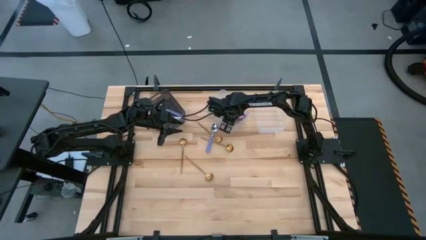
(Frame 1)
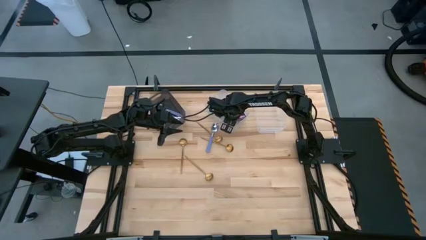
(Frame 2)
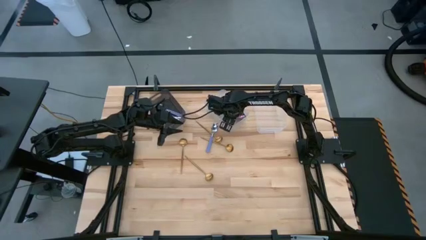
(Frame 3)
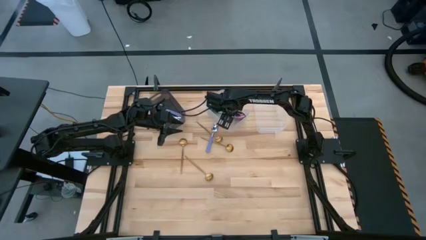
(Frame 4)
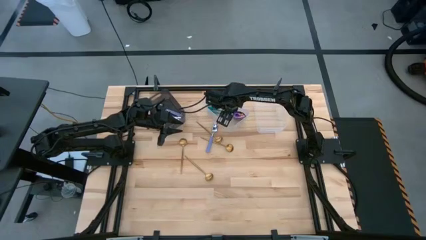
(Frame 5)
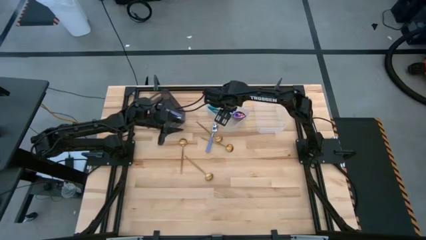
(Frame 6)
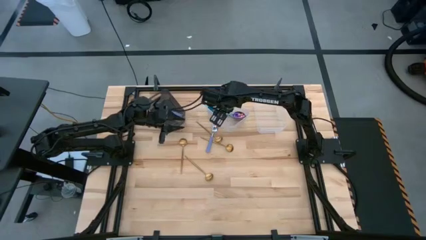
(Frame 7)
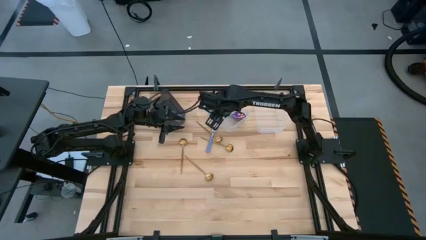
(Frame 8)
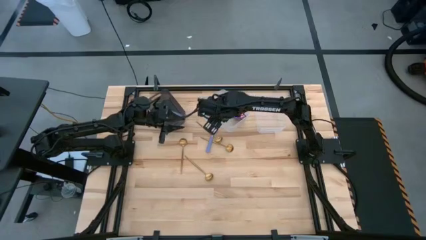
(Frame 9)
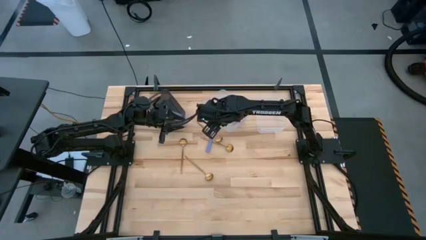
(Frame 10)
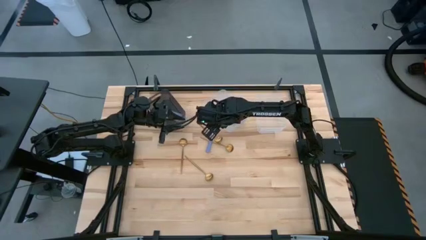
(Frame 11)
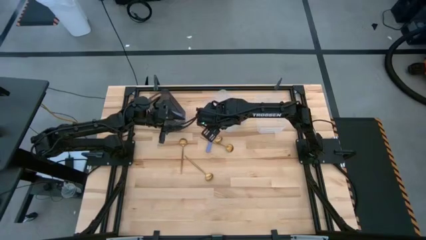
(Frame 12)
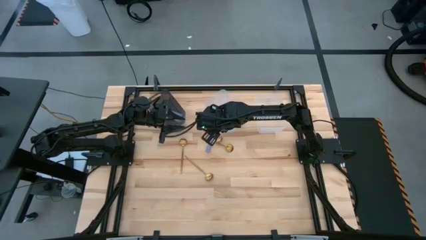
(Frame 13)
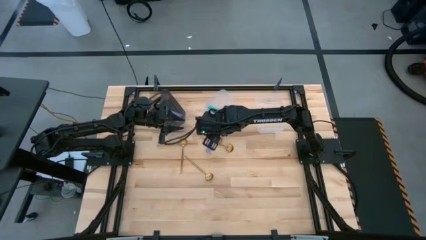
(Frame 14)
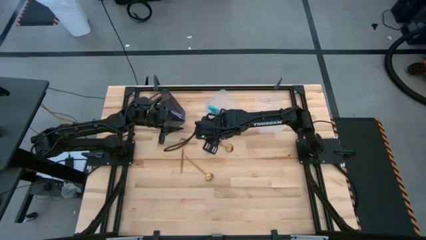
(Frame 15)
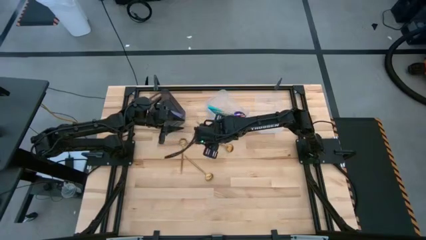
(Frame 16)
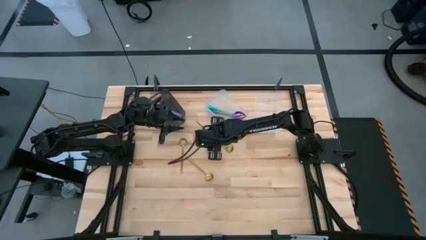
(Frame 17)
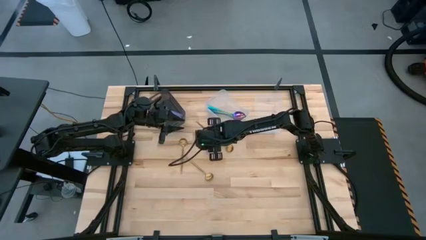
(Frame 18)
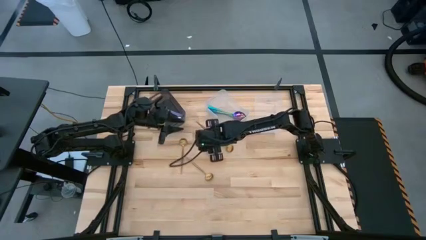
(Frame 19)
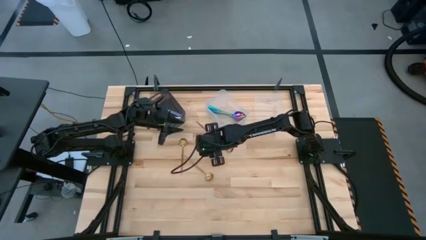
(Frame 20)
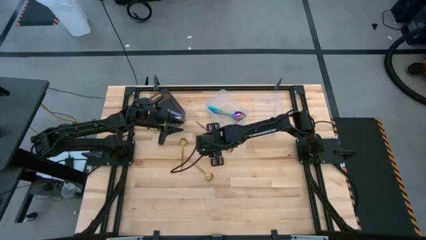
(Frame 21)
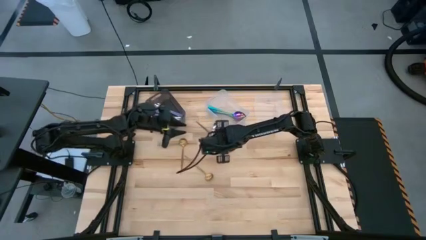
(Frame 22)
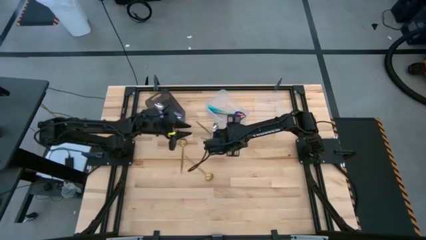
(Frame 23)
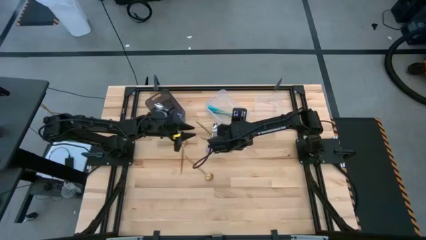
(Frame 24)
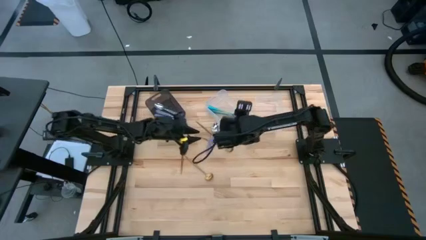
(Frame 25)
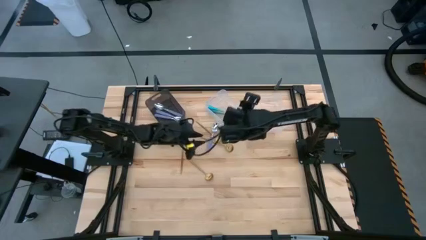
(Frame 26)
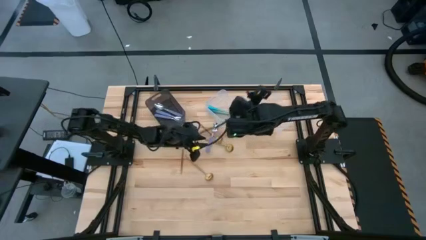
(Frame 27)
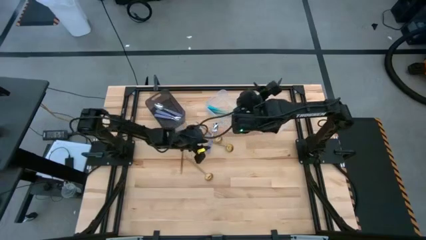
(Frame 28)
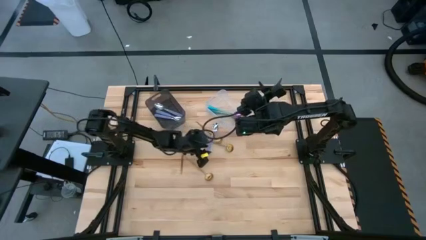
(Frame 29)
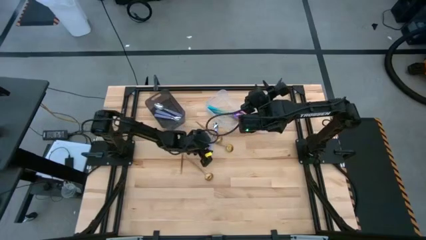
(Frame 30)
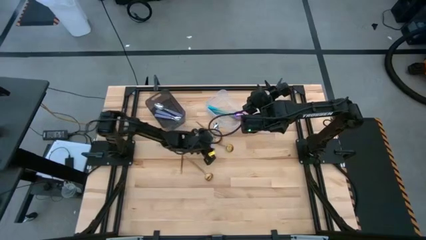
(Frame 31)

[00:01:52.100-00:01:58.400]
Task: Sort silverware by color (type)
Put the purple spoon into the black bin

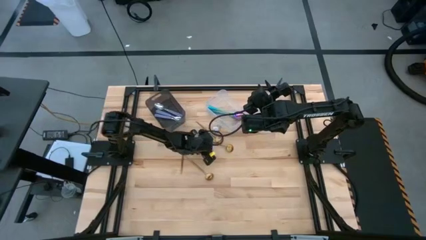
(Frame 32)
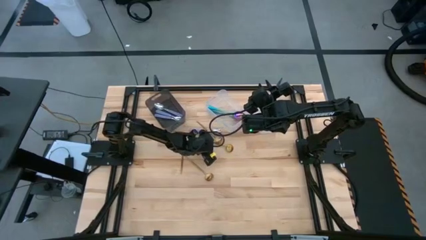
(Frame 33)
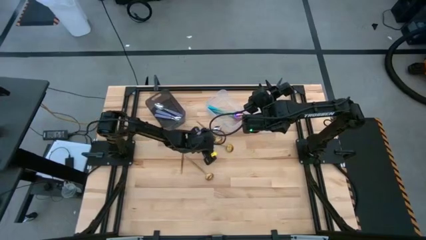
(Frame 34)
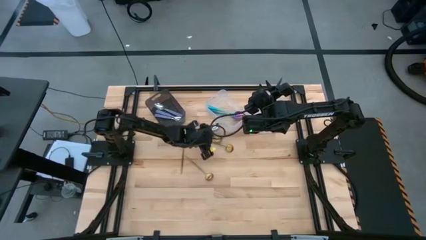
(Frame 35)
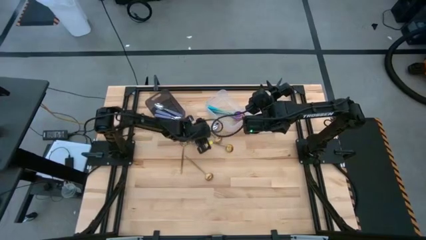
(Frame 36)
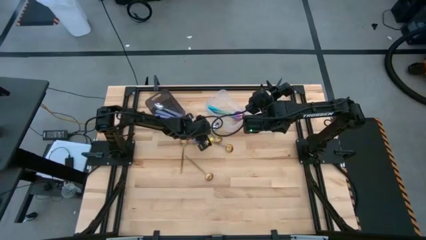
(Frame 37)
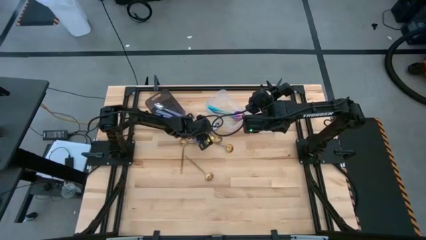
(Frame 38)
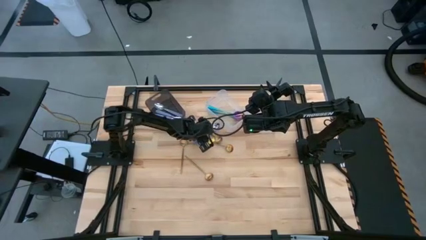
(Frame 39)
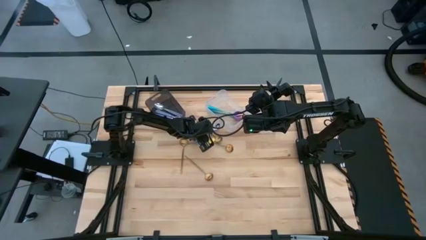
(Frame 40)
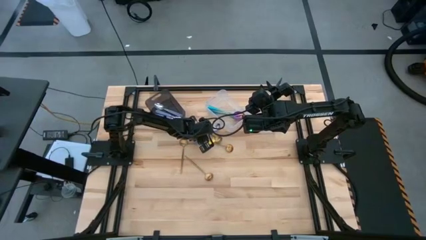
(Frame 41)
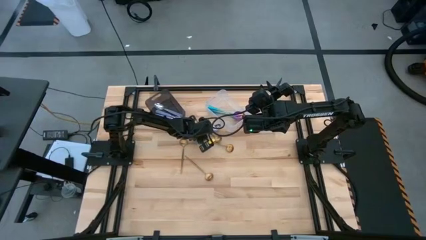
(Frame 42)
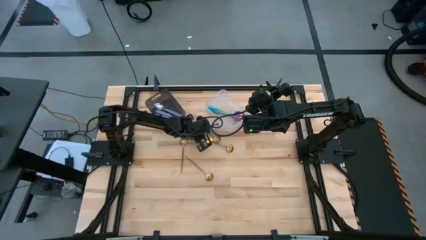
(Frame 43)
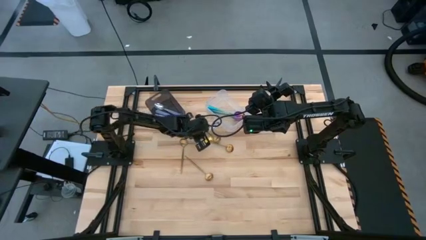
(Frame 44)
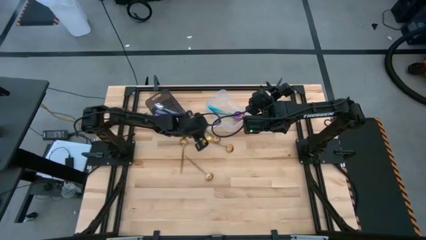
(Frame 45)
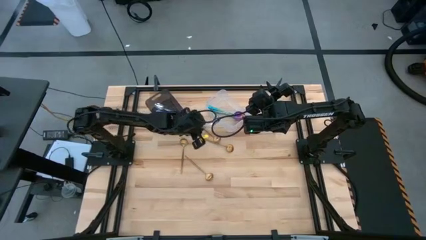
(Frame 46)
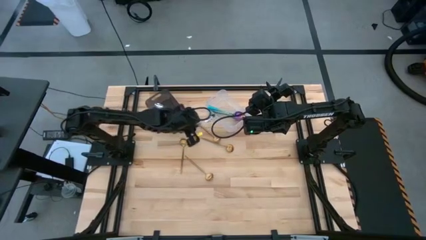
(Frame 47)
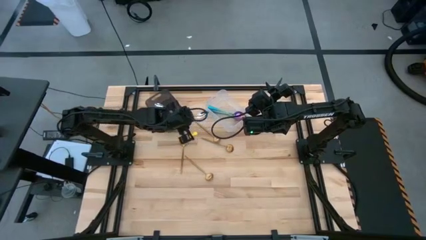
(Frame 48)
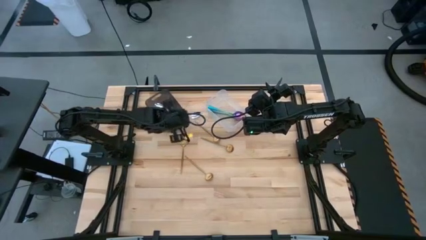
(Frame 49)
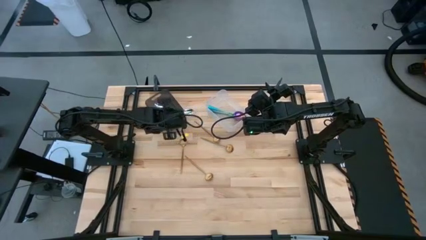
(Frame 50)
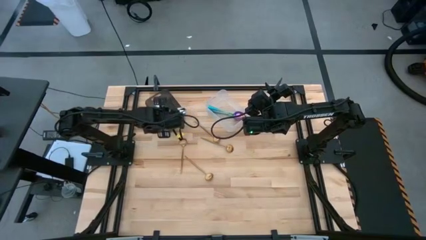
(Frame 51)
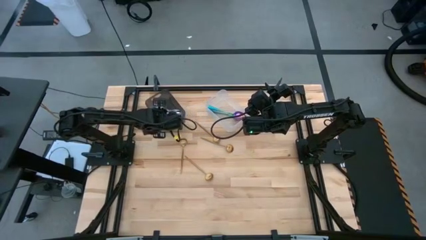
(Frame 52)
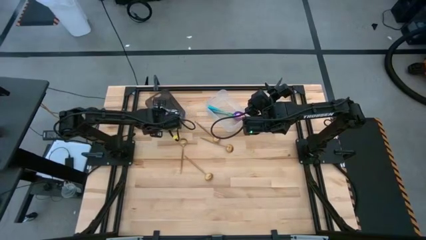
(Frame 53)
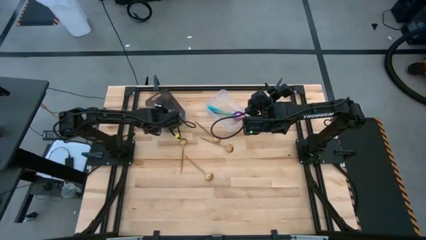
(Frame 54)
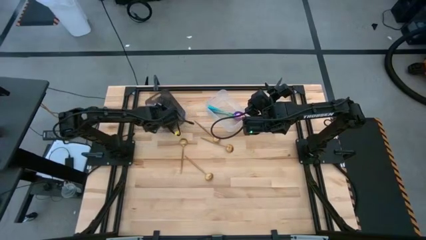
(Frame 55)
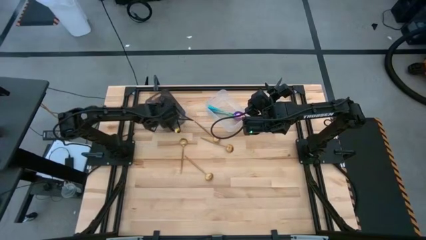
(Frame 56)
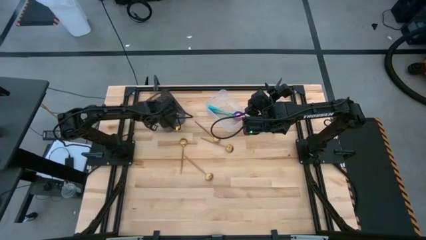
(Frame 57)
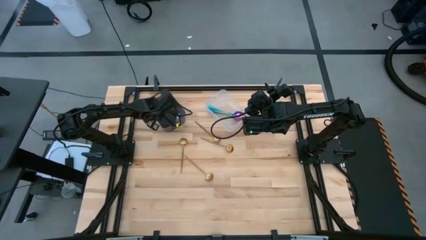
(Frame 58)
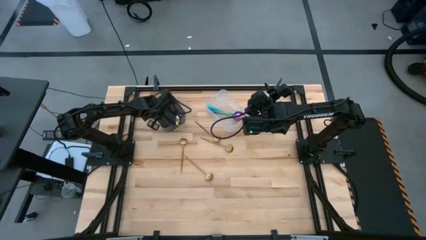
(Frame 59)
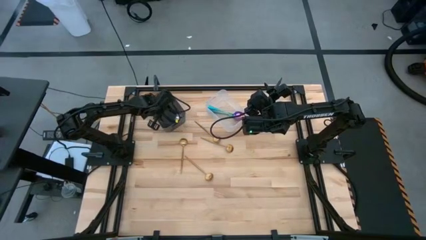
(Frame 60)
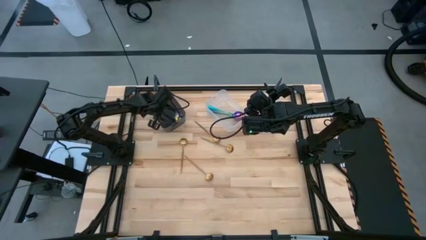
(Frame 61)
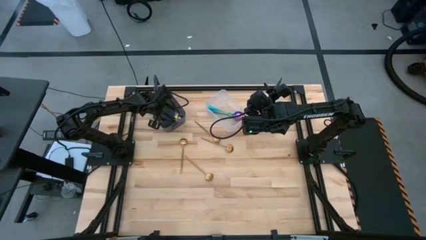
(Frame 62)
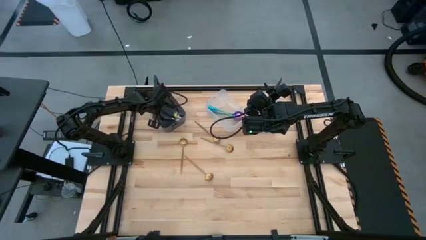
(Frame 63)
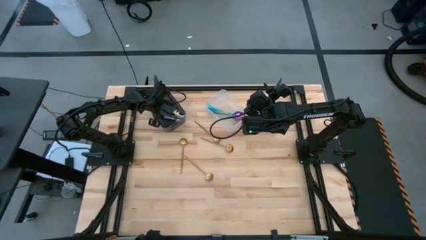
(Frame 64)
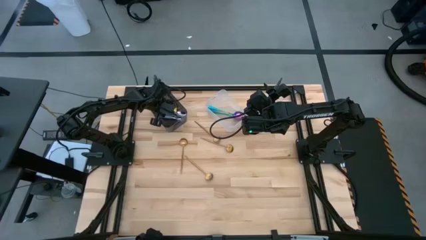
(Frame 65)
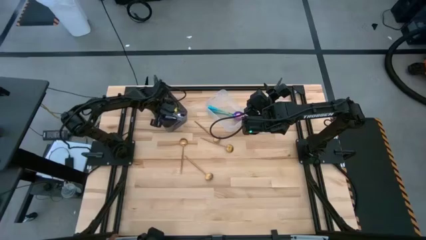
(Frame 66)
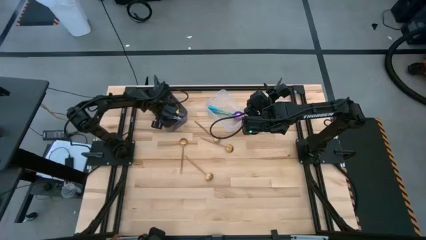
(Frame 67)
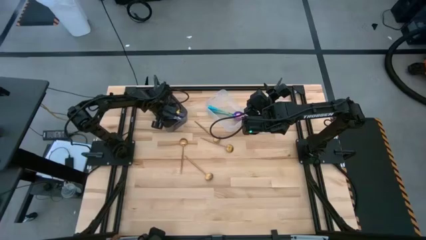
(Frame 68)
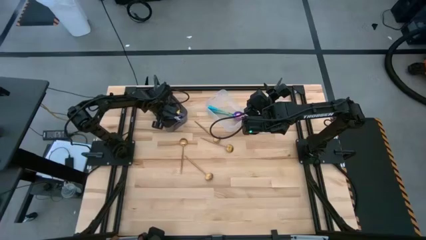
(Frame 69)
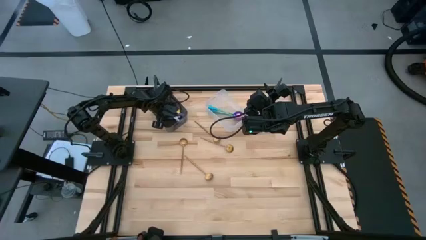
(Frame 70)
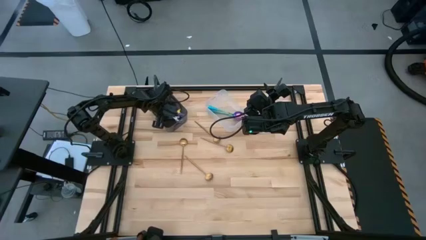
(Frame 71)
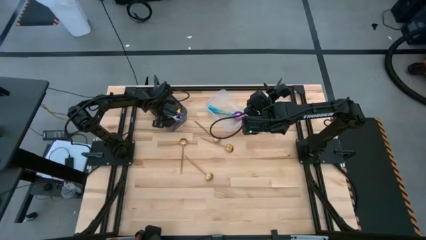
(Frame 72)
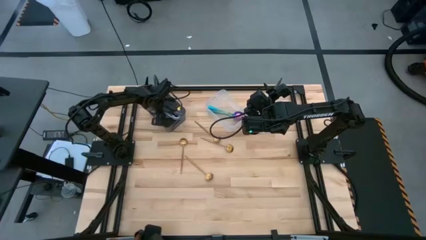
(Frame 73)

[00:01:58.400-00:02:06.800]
Put the purple spoon into the black bin
